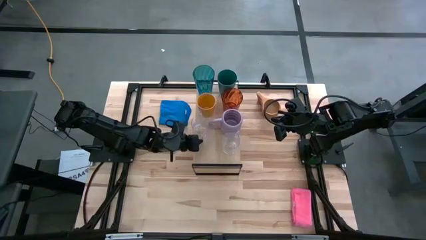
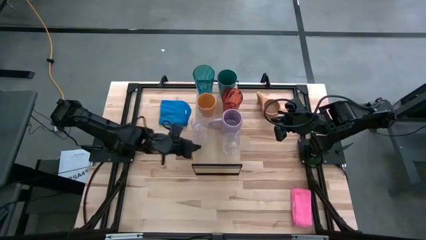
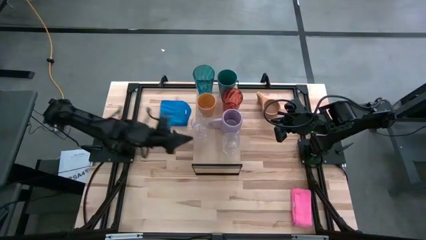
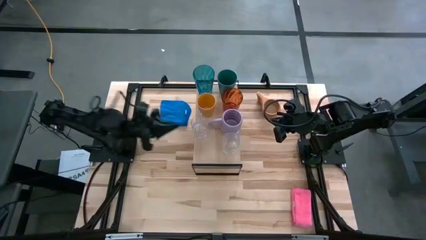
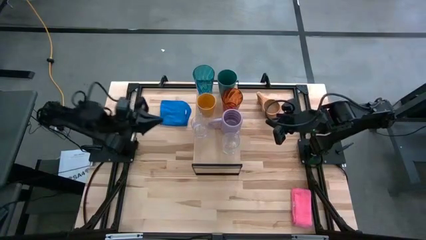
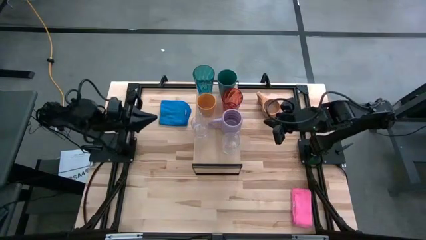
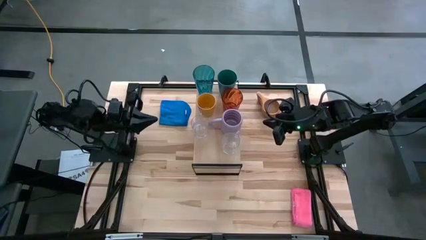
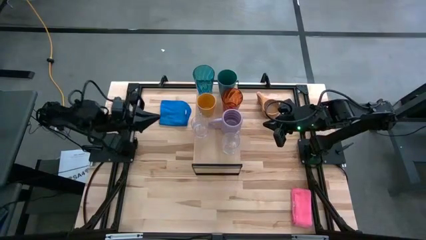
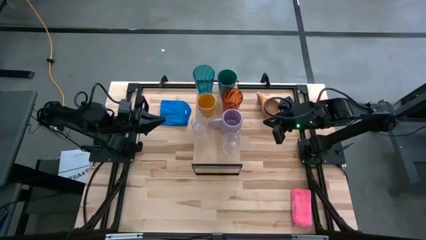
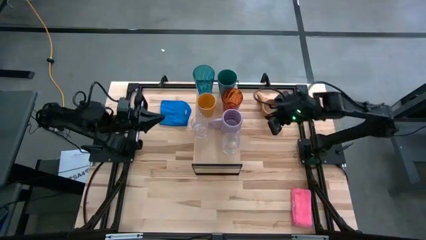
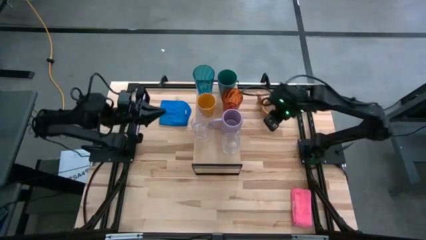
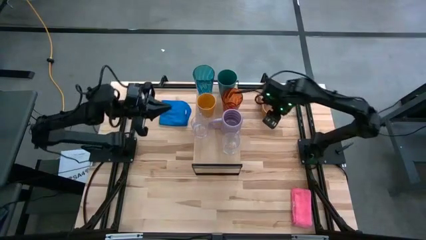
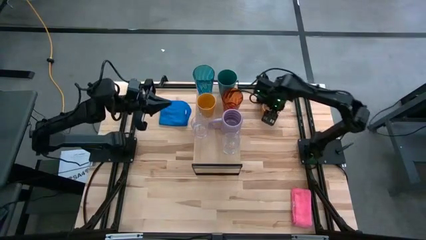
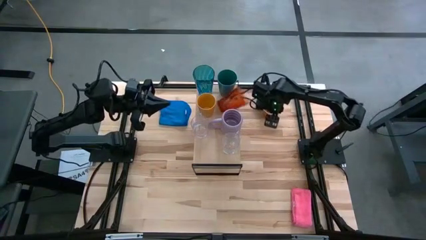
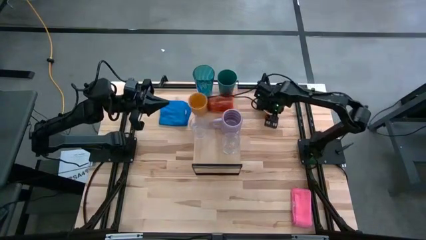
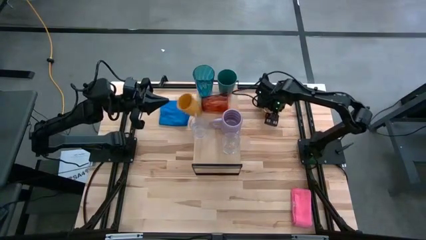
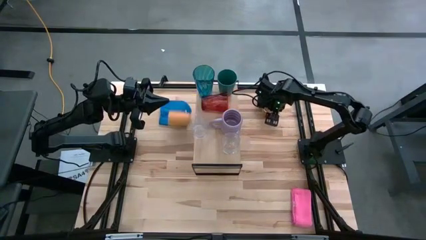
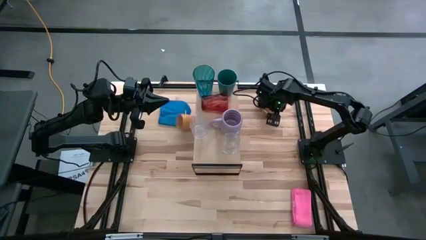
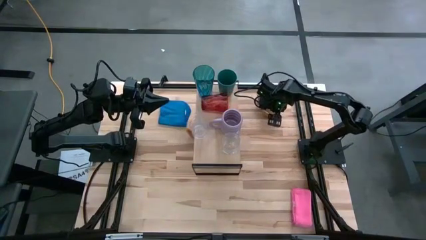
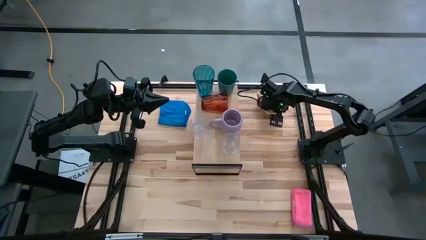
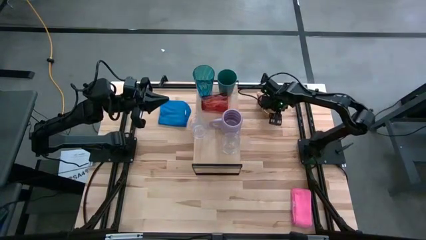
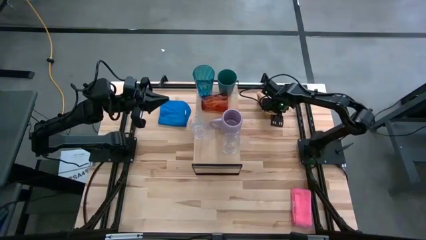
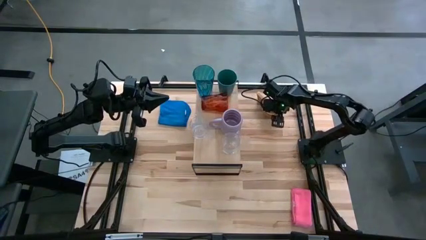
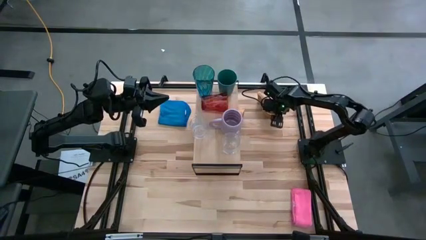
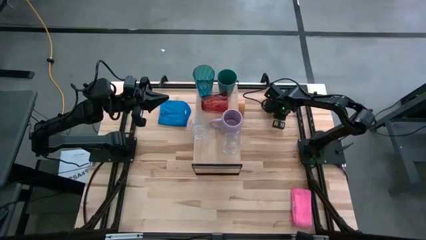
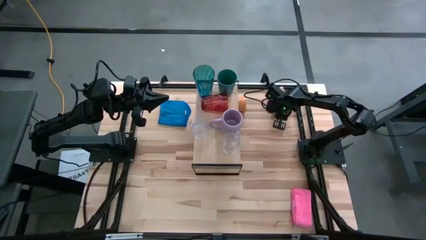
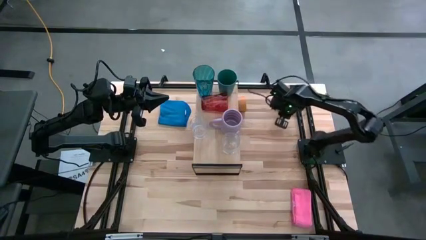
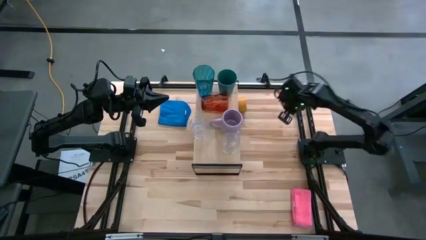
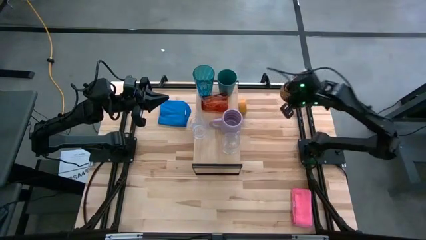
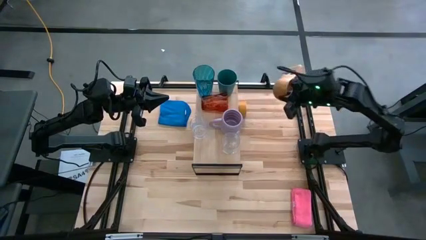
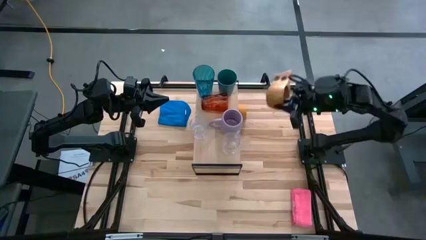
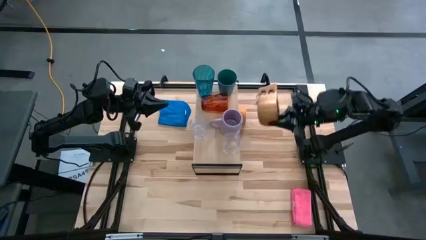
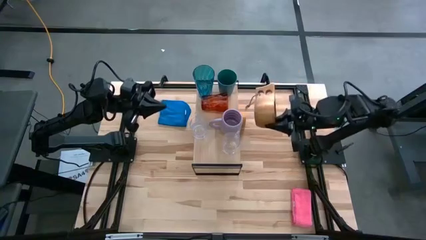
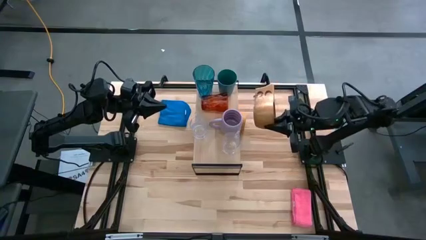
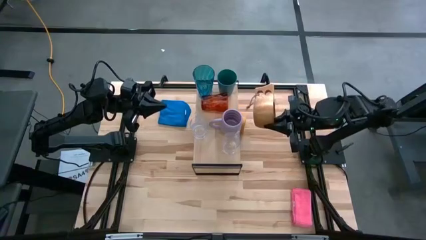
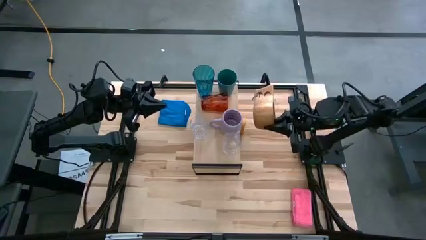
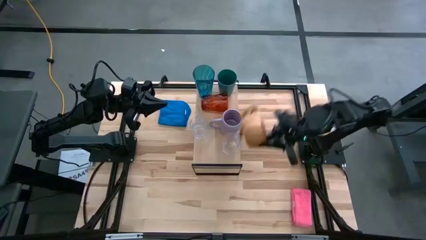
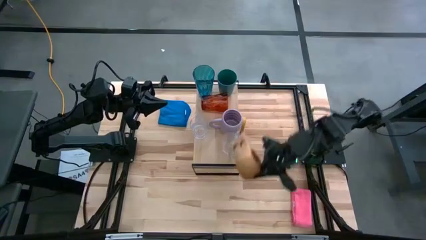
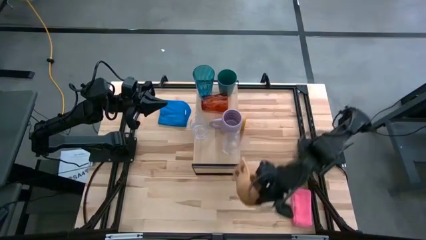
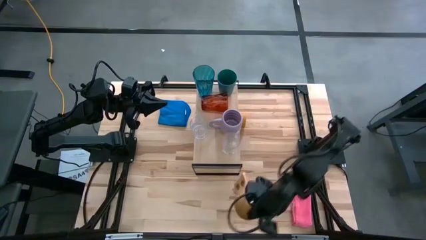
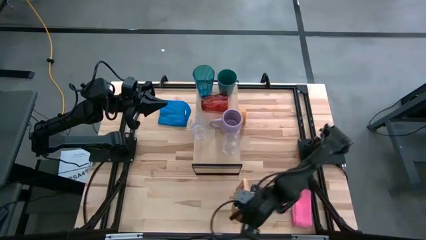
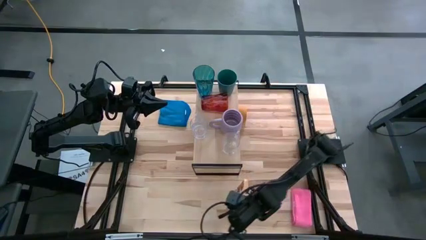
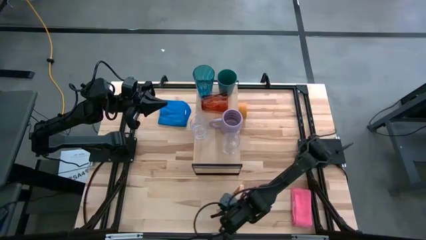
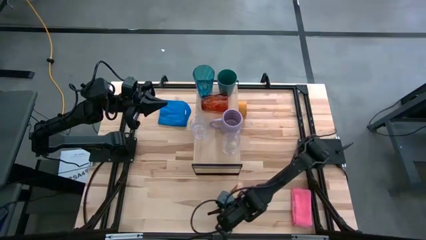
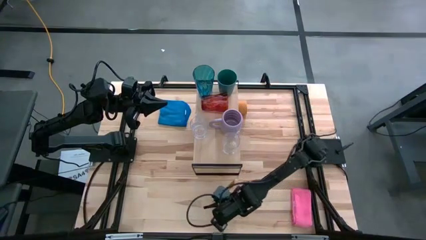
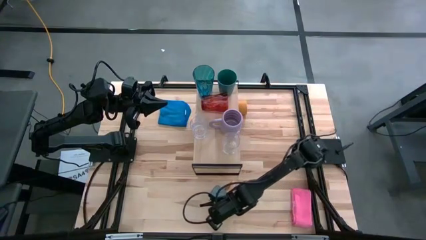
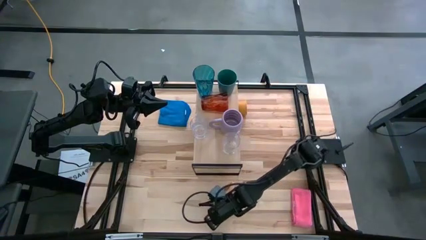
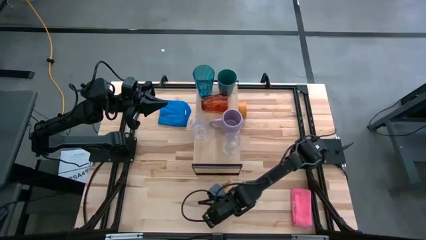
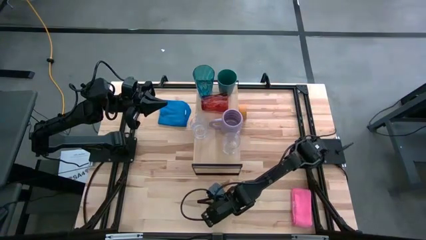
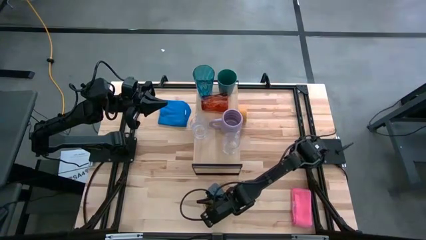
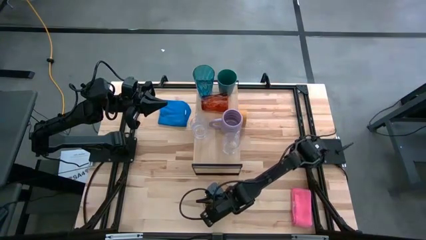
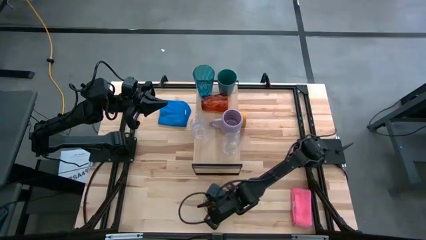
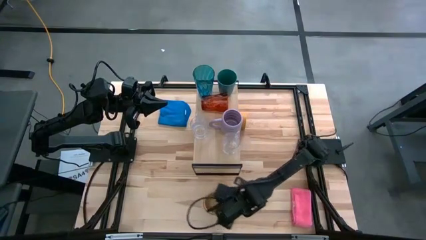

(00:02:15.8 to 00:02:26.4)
Task: Stack small to large cups/mugs on shelf
Put the brown mug on the shelf

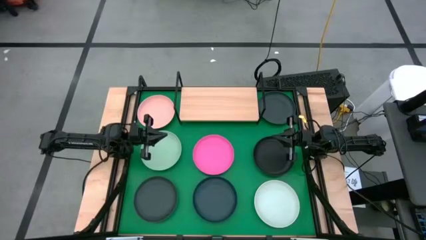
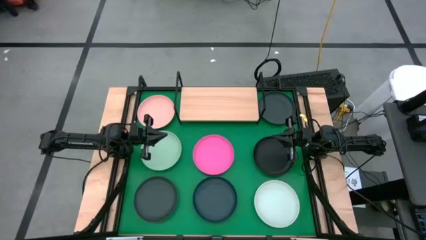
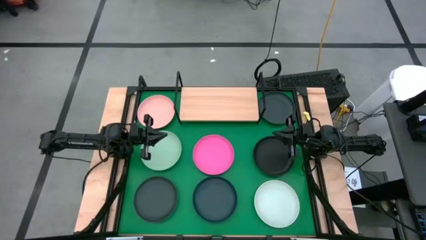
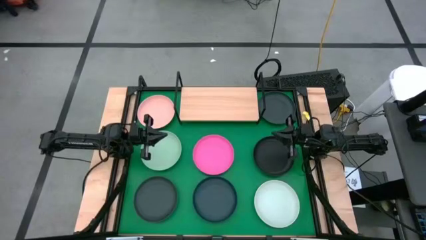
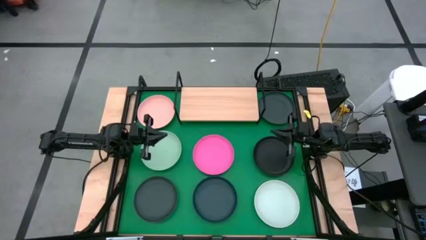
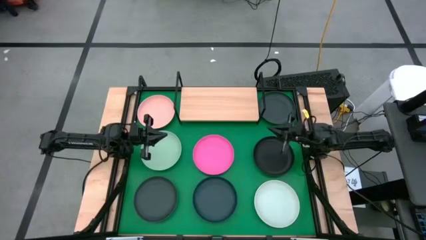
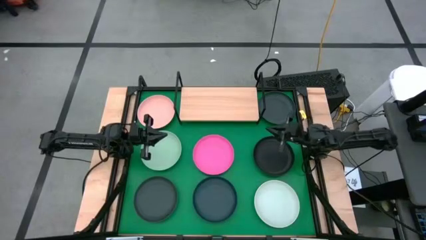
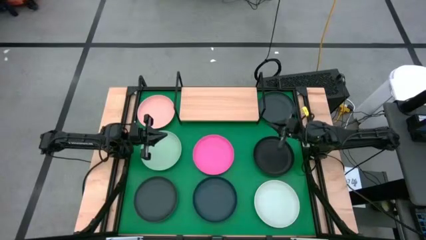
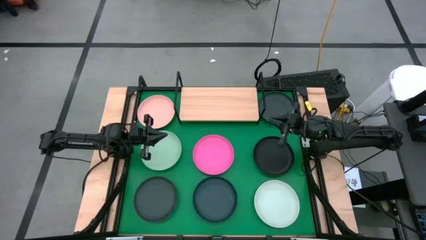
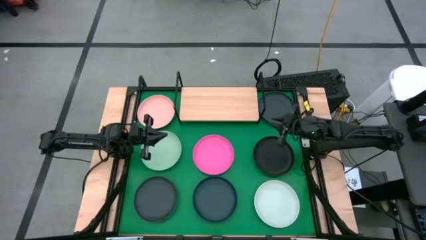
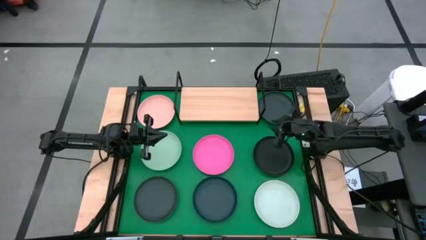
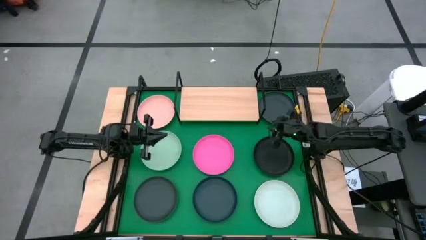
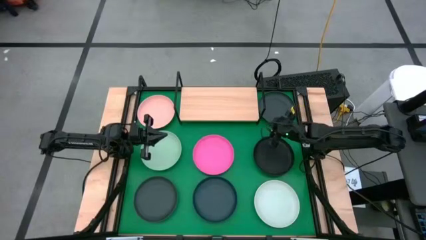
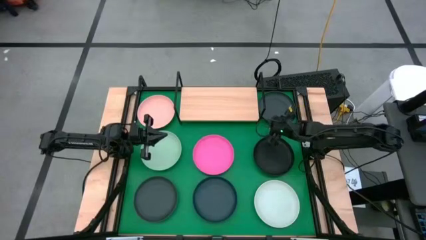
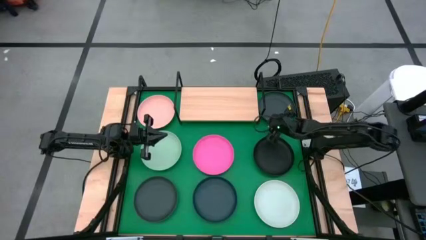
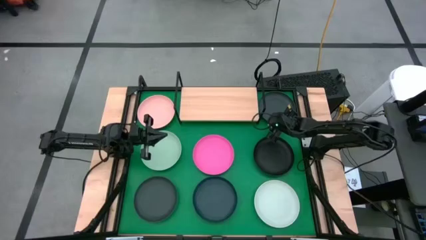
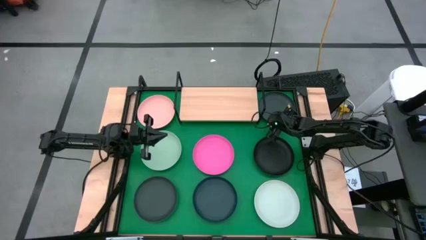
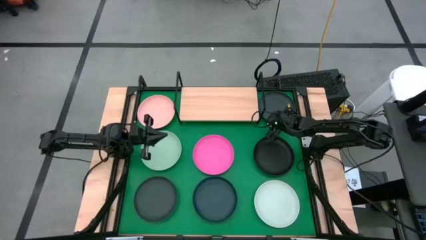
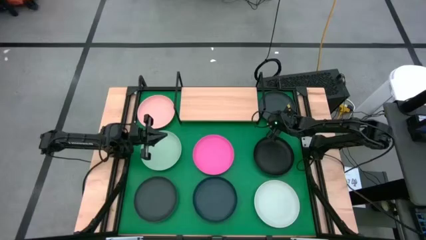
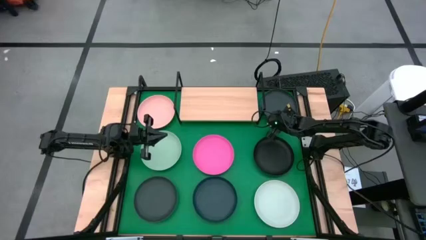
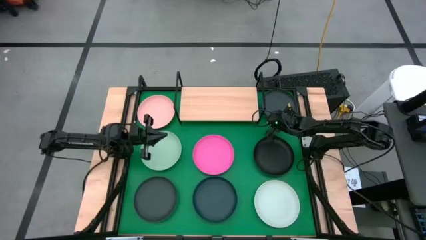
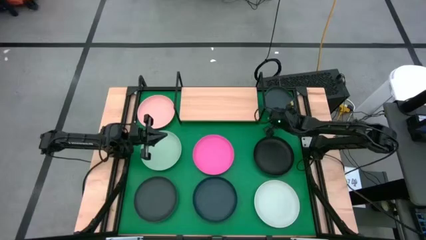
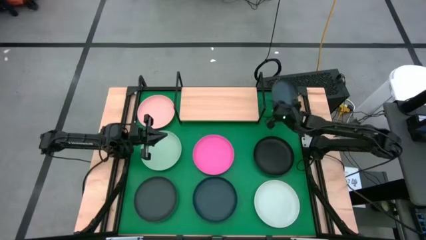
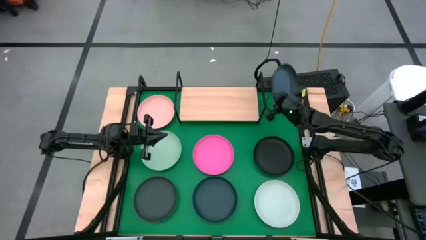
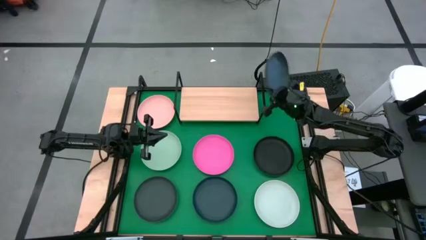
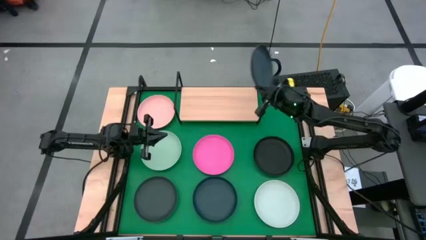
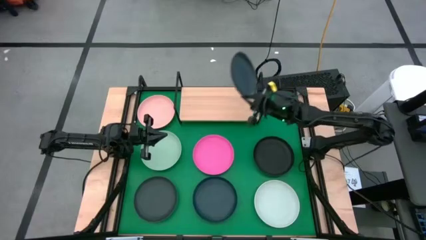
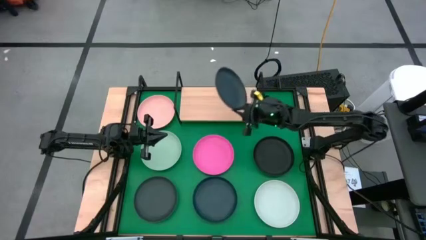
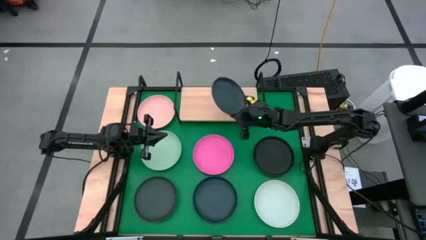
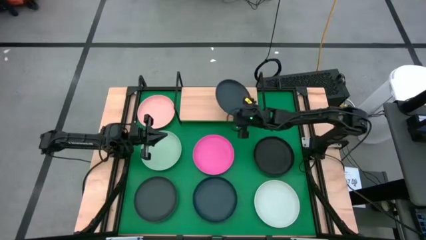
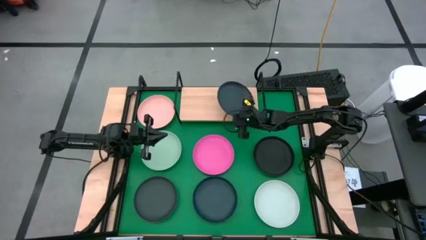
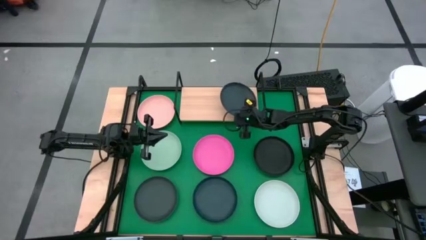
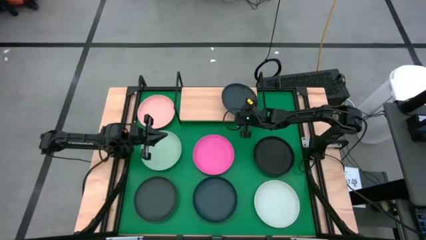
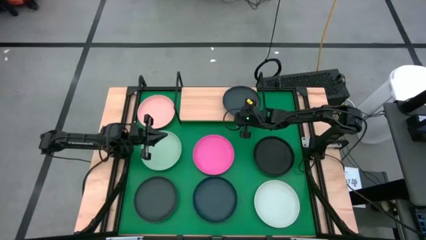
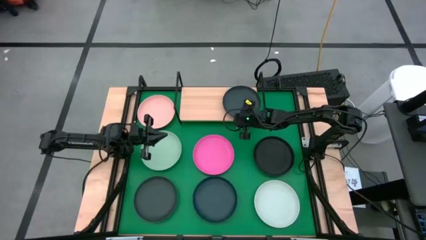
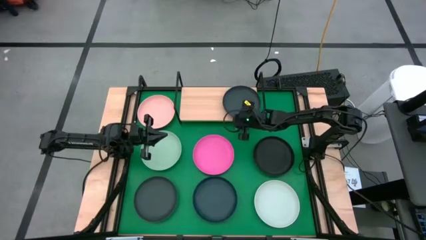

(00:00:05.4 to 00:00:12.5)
Task: Place and stack plates onto a shelf
Put the top dark blue plate on the shelf
